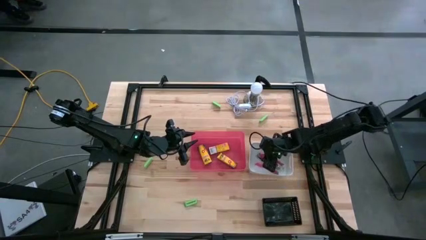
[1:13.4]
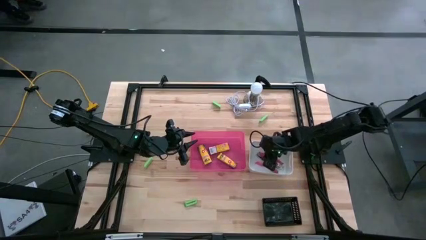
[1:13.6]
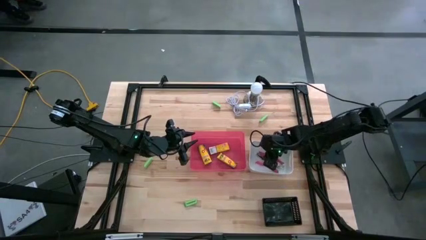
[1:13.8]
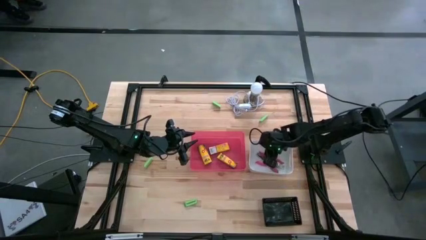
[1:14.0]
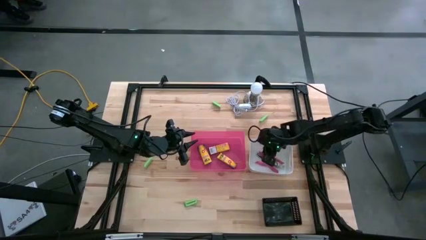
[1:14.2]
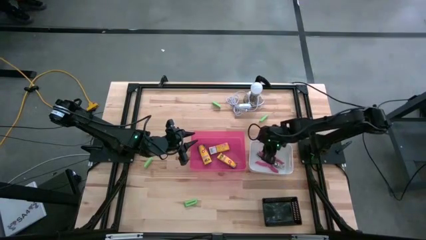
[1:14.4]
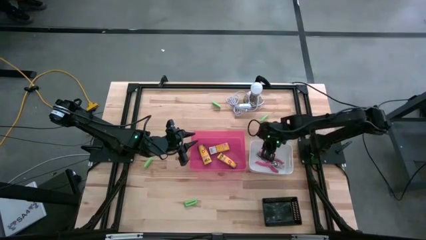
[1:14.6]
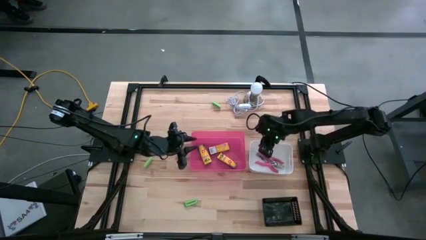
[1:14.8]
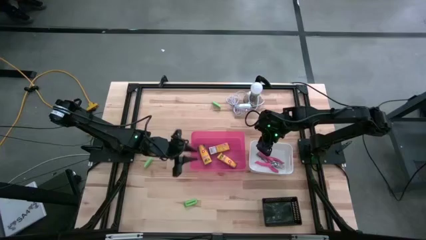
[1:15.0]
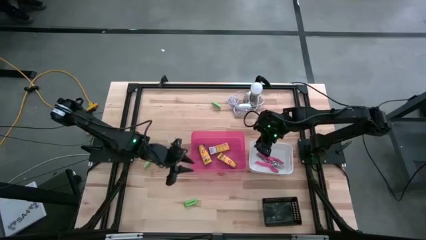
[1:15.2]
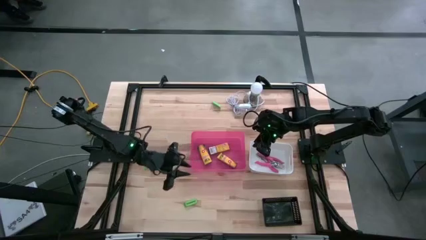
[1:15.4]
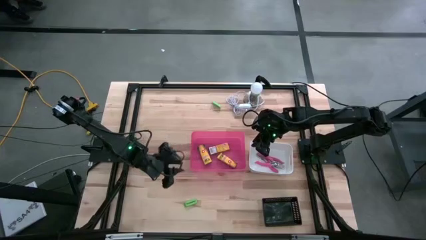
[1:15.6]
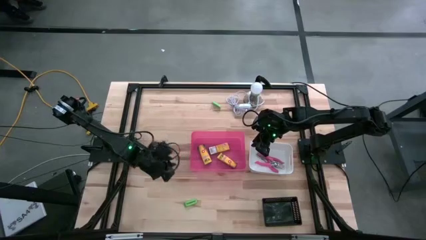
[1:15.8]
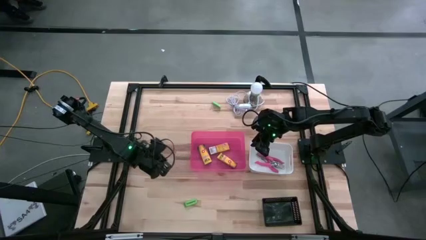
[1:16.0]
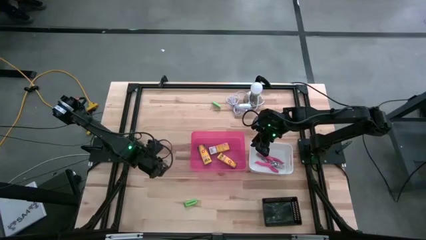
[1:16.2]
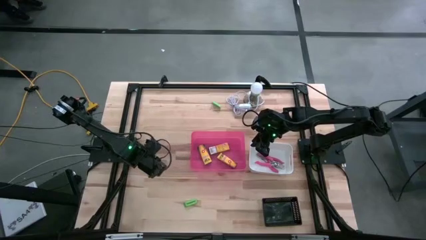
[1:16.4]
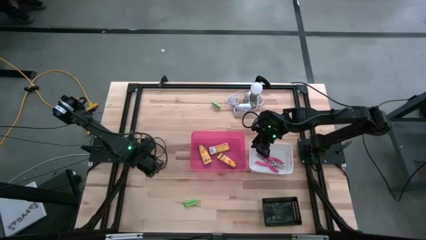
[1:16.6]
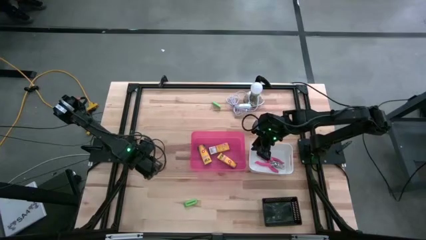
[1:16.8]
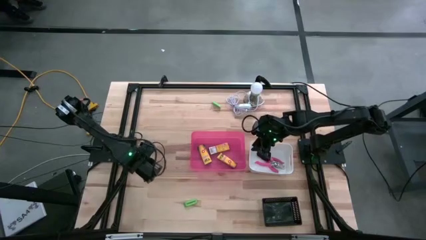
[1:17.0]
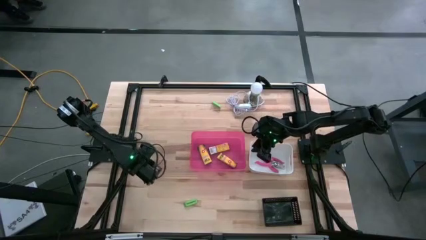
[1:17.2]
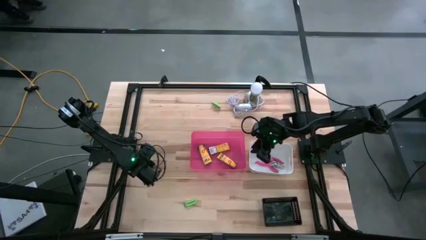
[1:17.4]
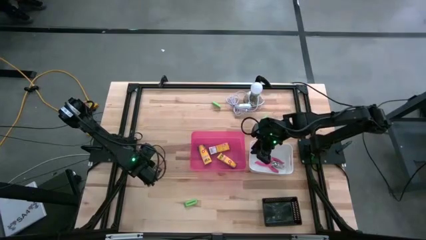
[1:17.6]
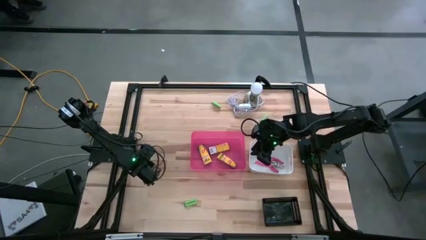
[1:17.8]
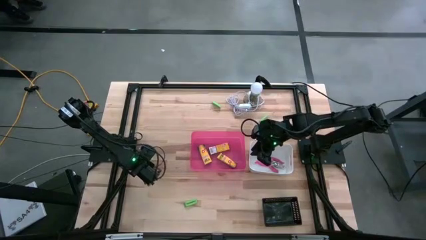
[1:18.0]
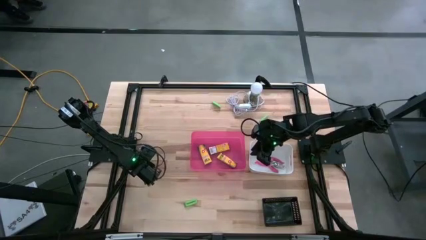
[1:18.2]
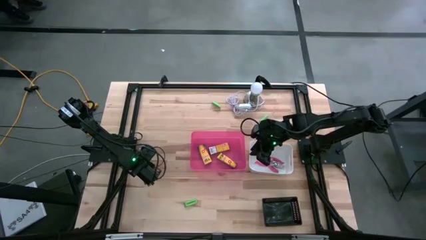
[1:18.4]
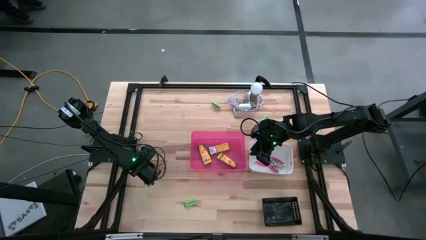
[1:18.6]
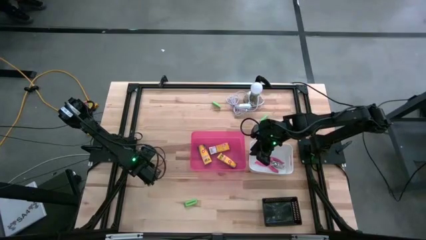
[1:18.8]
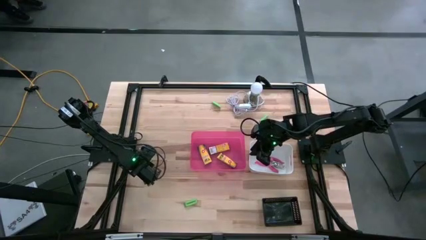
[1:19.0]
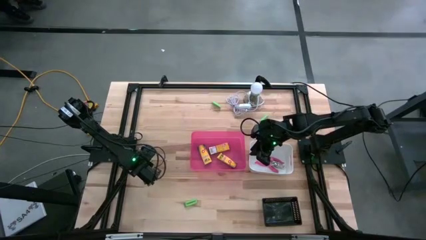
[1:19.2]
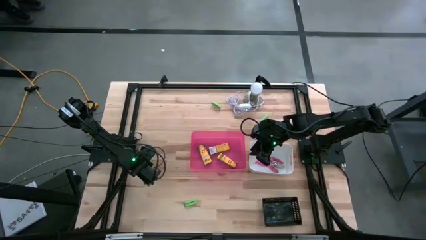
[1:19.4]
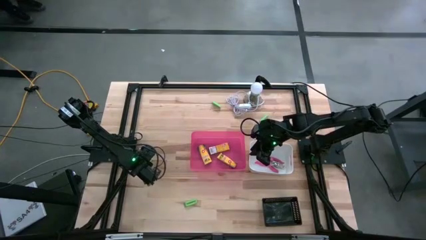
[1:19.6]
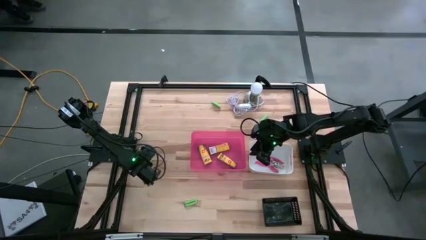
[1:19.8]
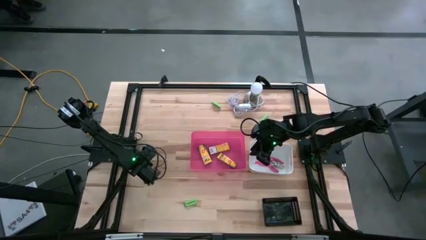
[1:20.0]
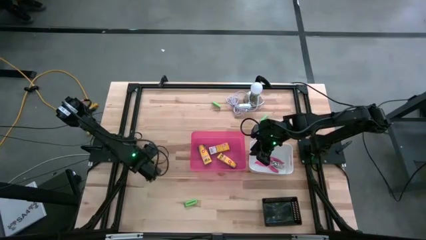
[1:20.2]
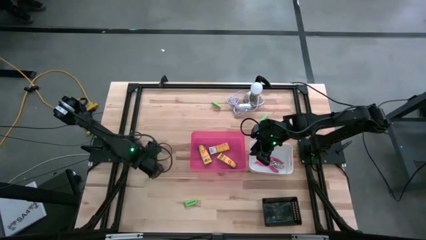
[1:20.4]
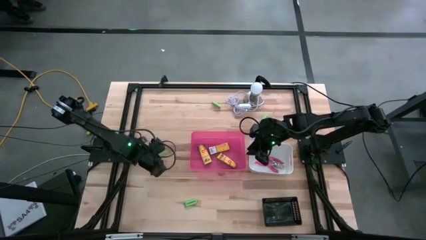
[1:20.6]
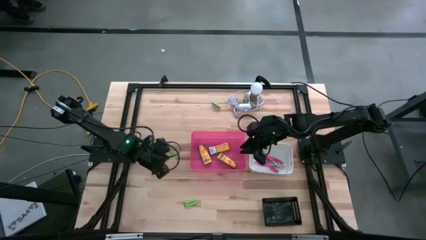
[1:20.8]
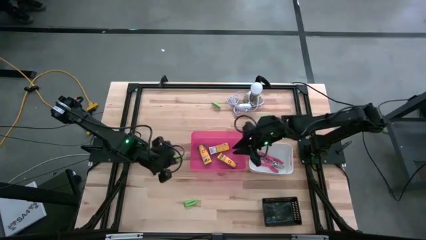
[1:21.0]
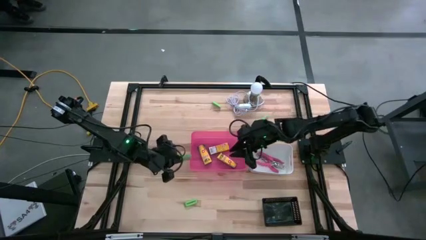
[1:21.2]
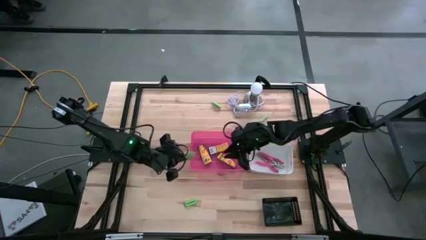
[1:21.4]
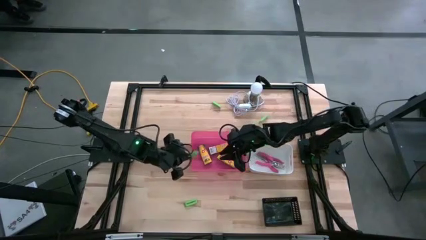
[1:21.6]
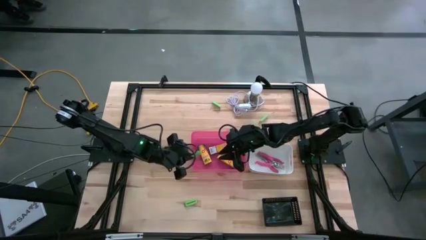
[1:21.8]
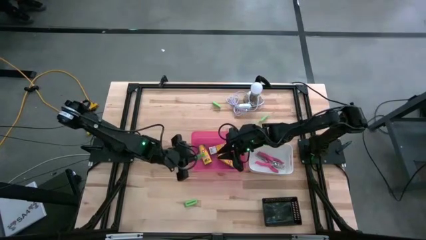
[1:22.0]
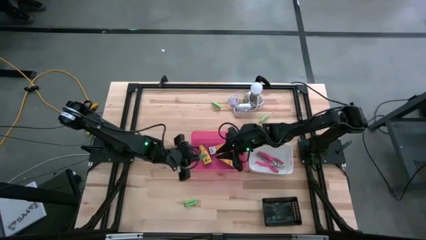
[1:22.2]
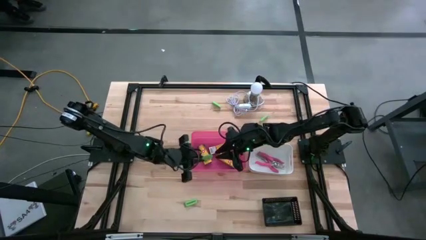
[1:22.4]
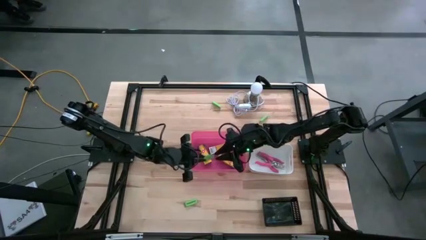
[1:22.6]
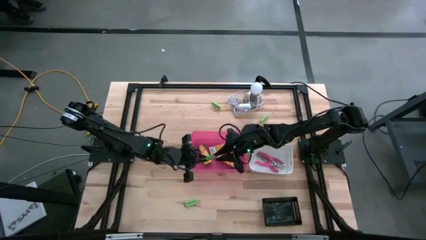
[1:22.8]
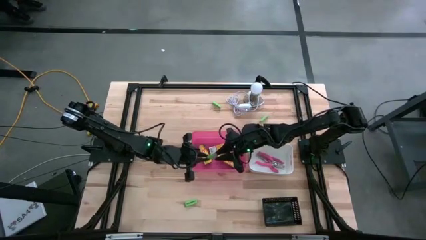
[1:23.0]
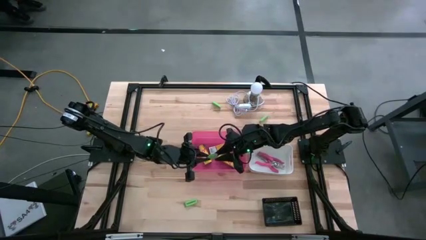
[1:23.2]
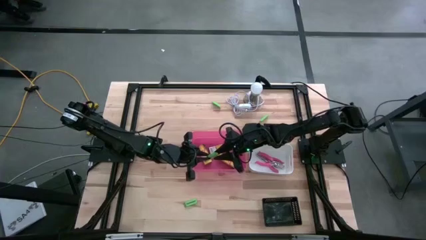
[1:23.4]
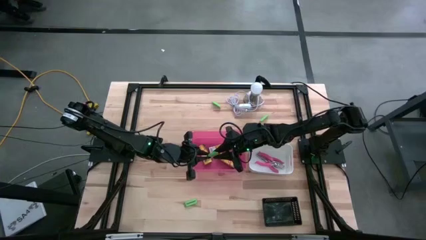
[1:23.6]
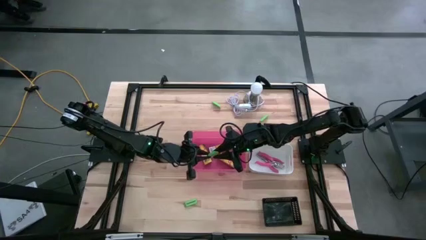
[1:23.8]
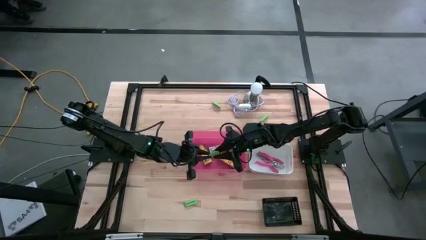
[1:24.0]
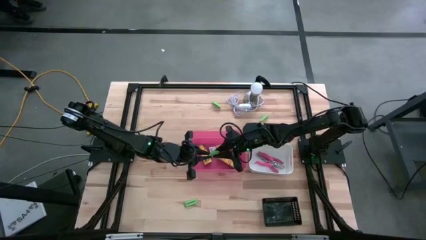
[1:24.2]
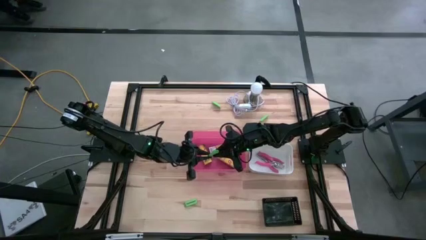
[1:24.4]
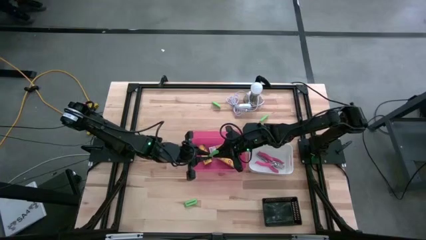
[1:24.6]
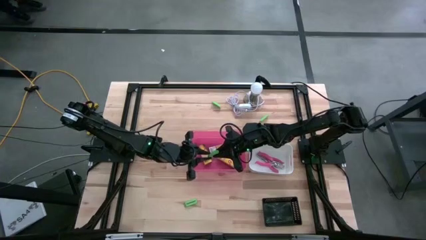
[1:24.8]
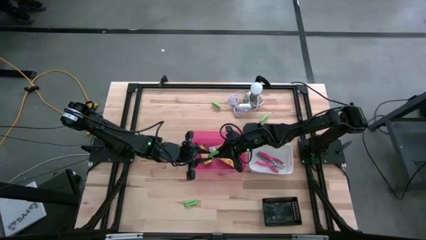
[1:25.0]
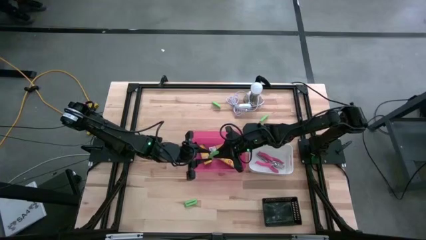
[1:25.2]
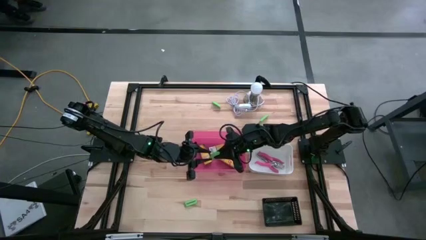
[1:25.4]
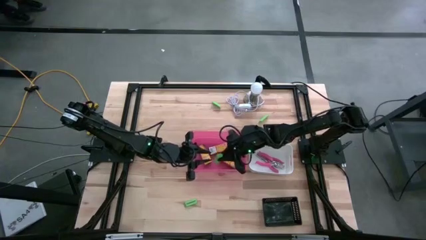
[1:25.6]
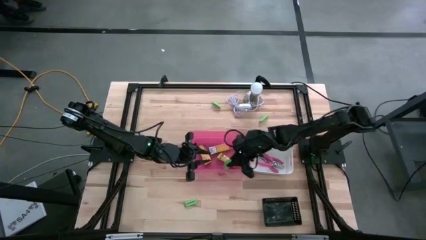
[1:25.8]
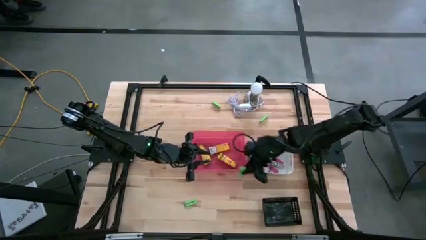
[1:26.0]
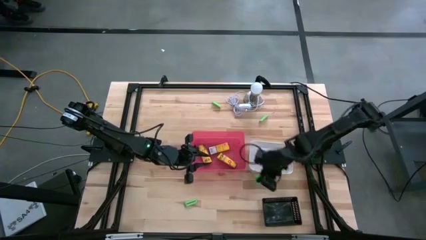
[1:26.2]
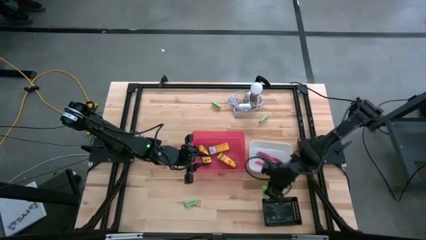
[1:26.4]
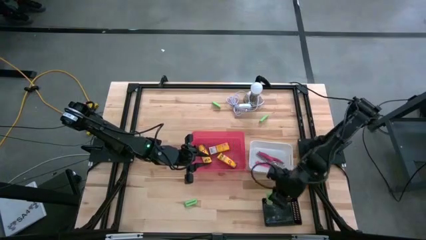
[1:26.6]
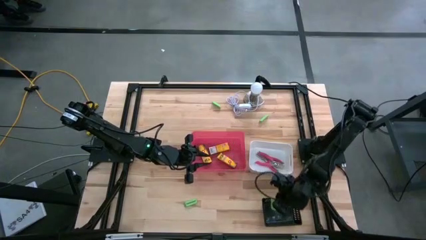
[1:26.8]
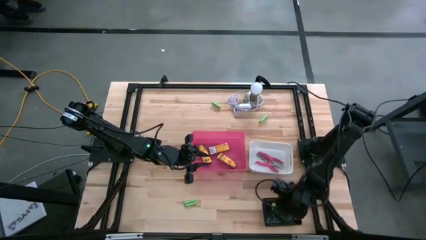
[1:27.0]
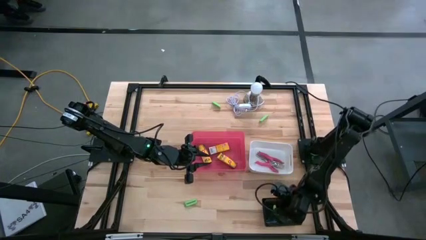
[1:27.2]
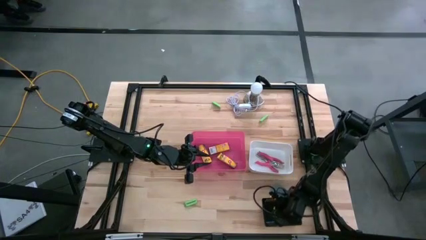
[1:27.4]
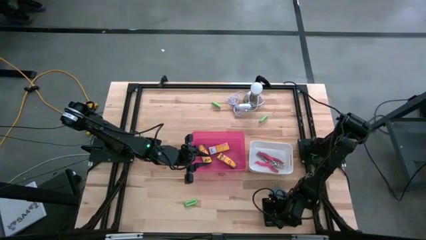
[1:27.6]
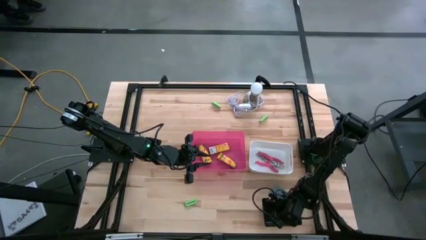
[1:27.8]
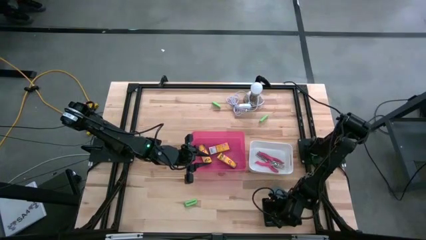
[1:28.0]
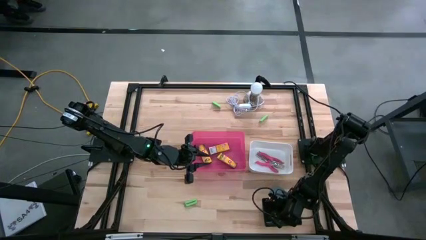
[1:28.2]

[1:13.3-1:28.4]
Task: Pick & Place School Supplies
Put the green eraser into the black bin
